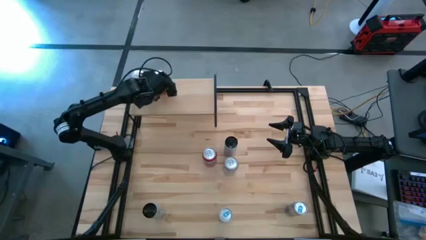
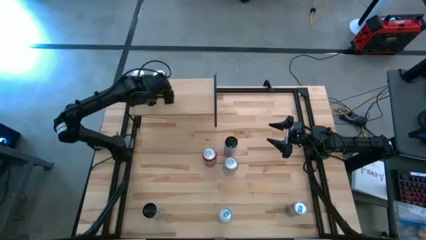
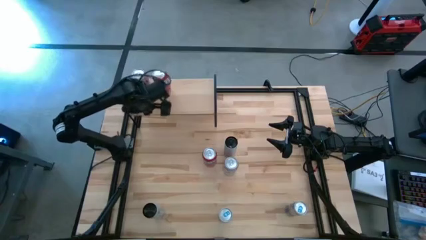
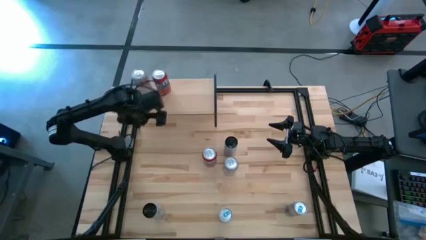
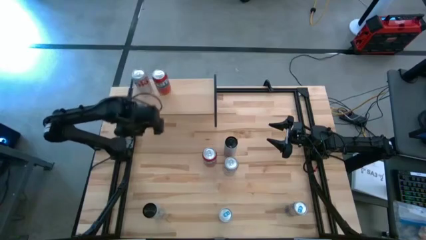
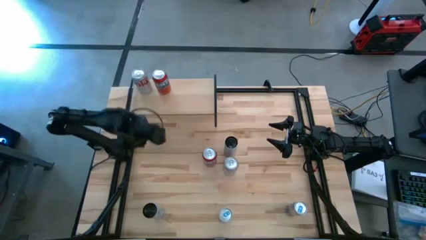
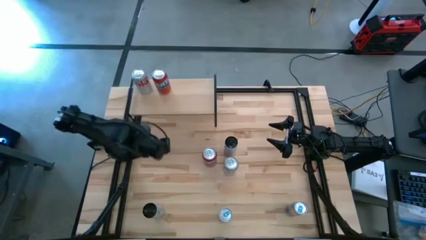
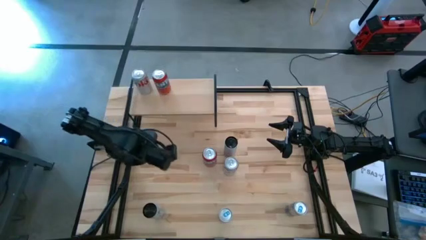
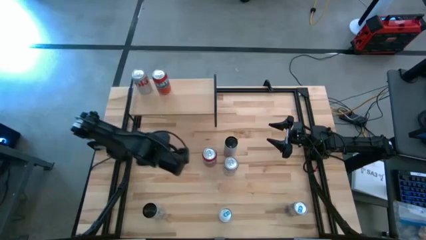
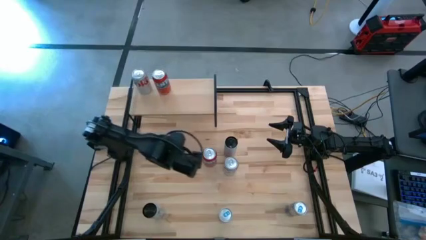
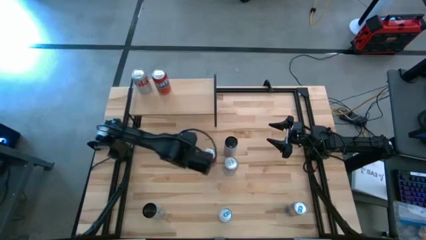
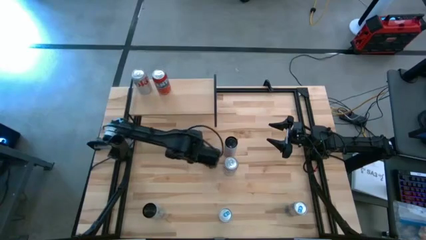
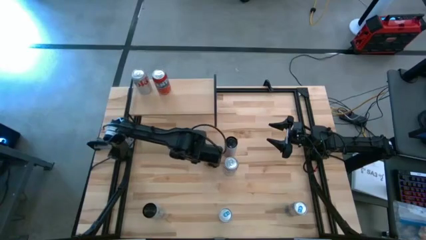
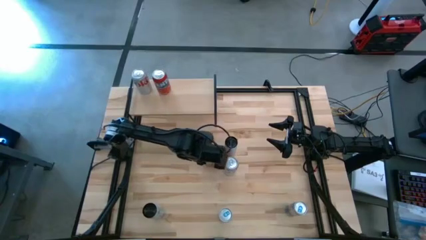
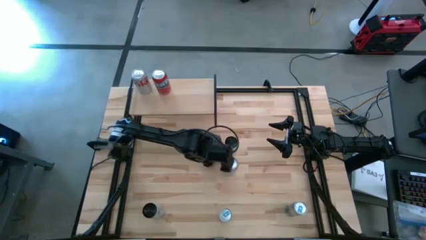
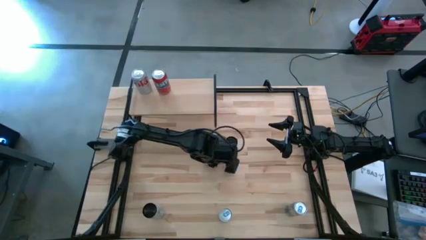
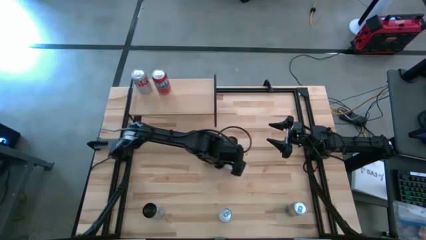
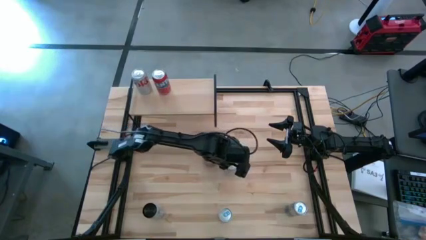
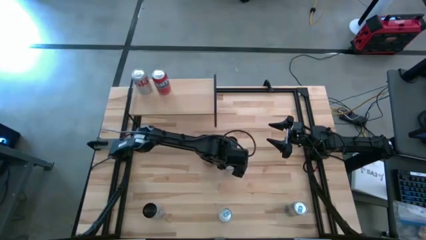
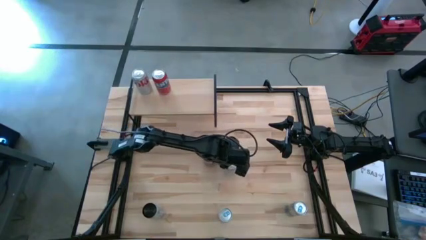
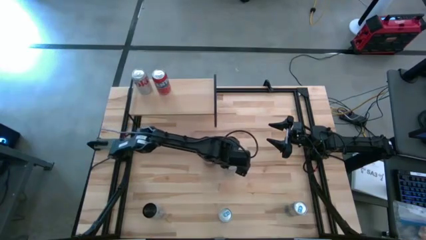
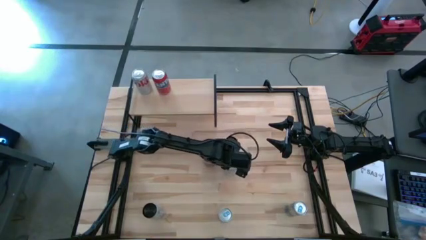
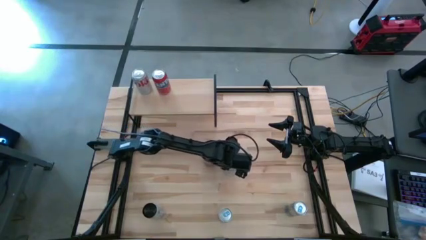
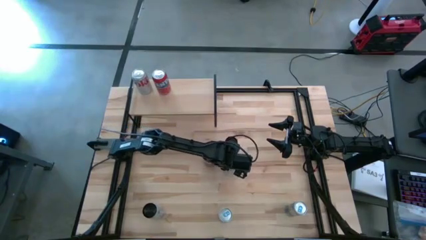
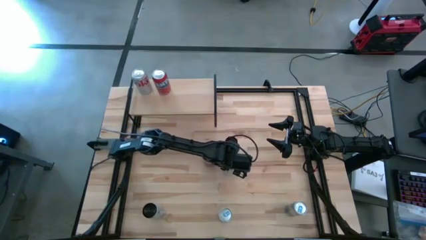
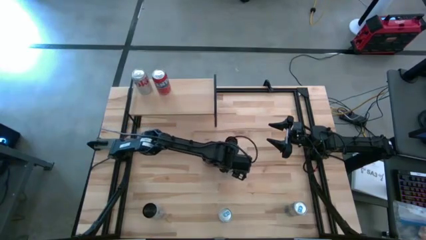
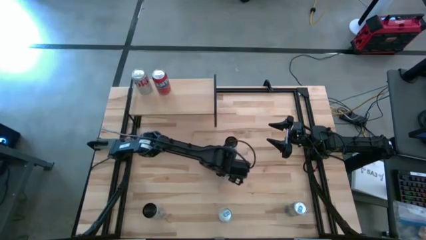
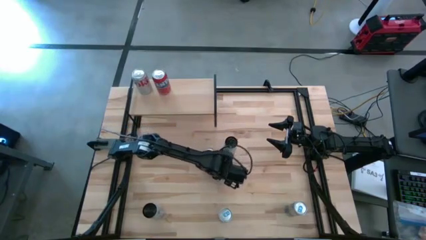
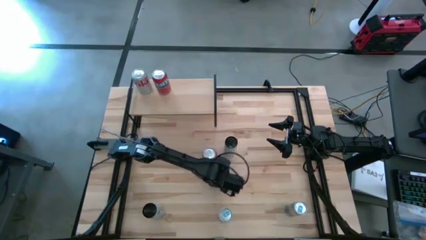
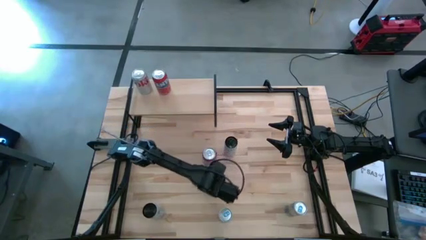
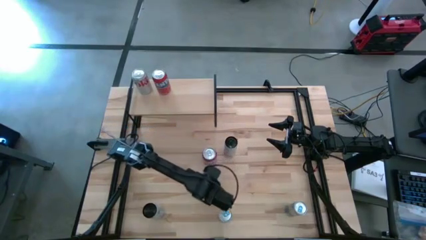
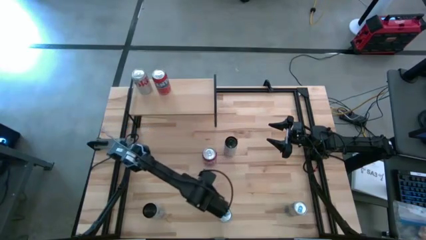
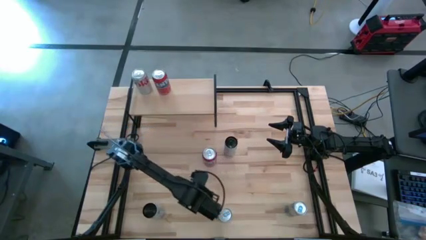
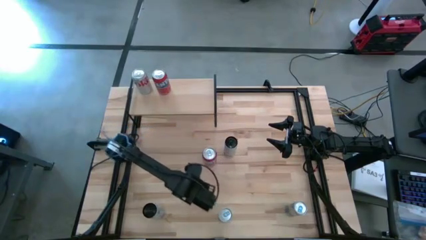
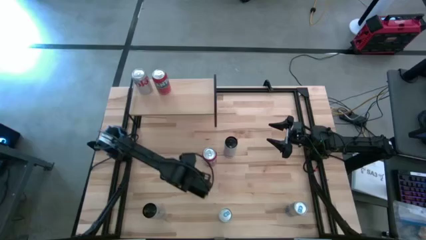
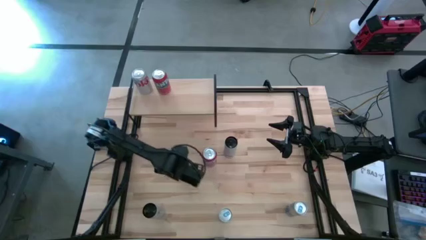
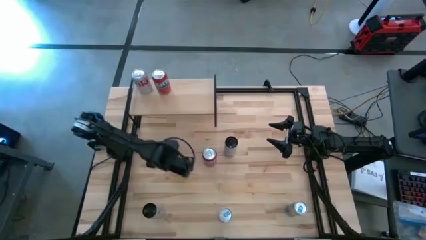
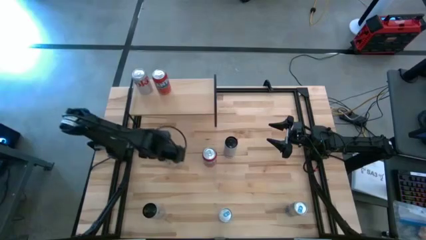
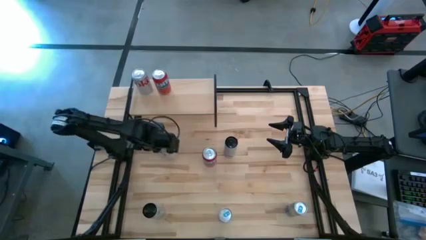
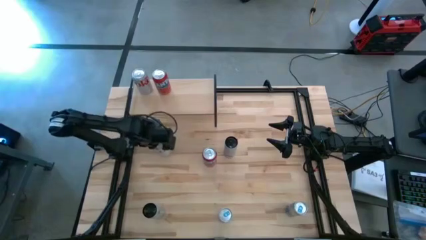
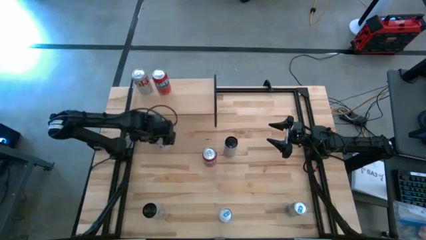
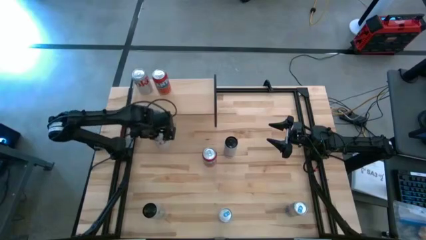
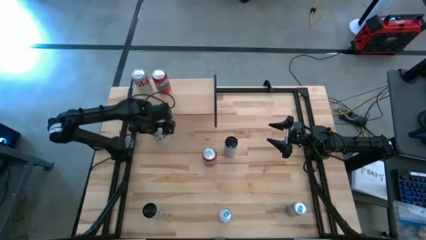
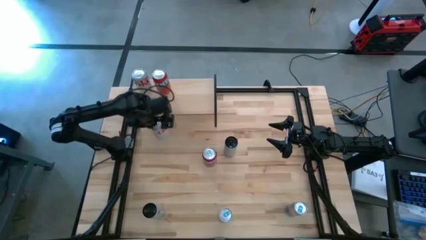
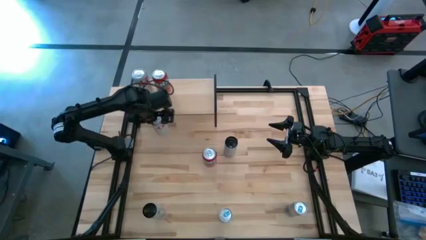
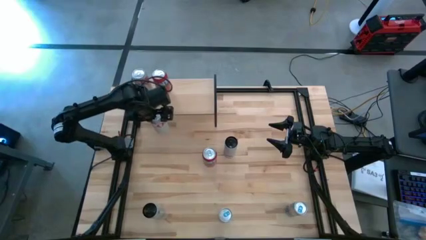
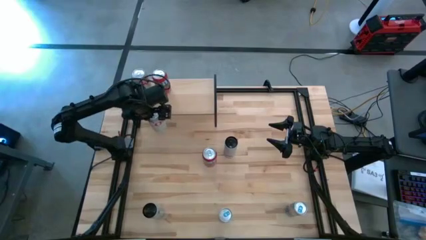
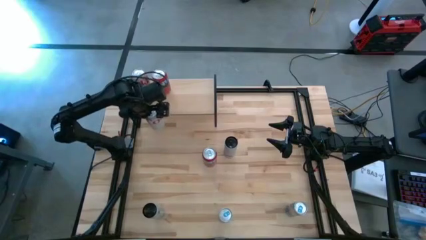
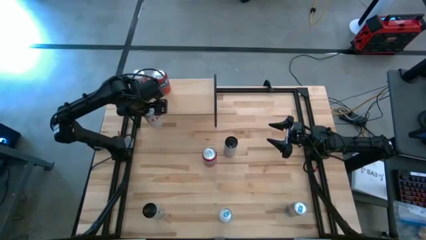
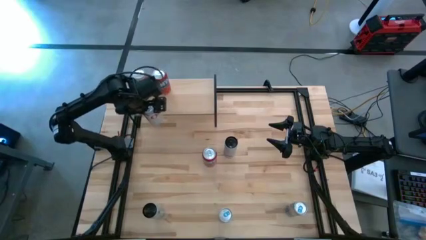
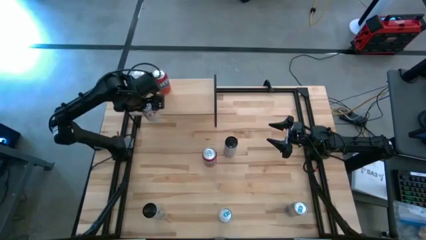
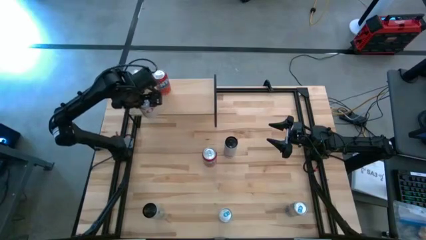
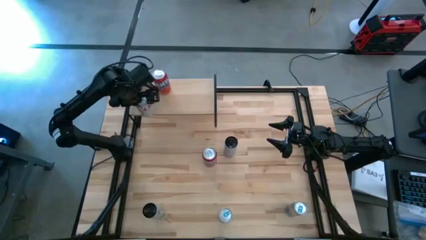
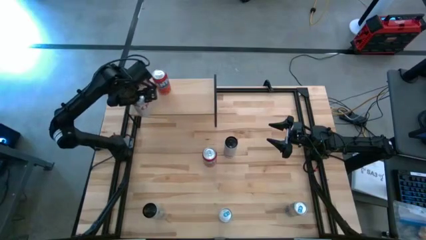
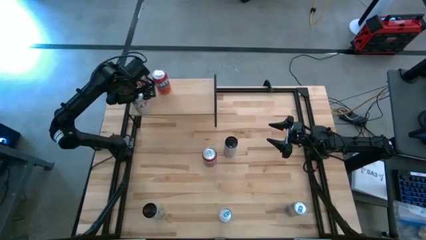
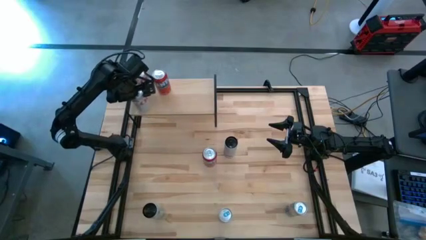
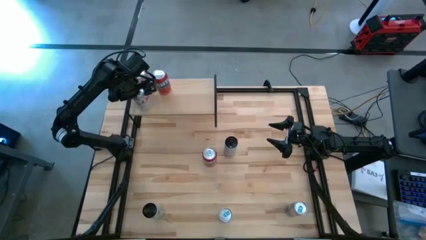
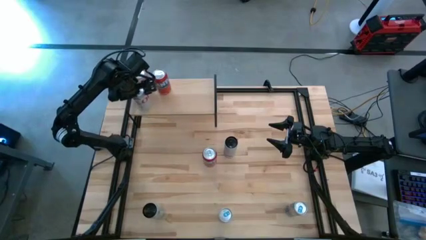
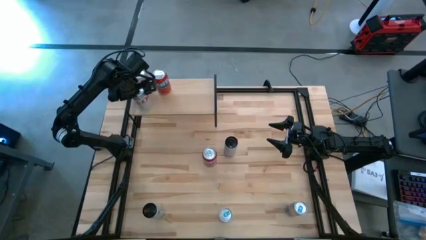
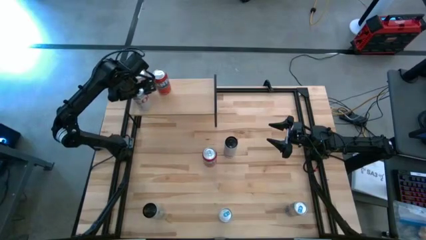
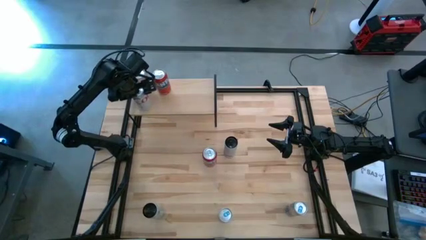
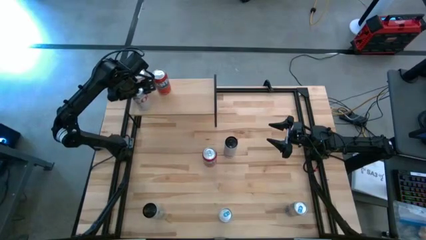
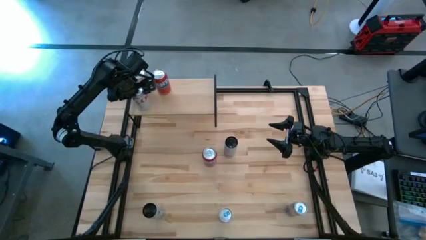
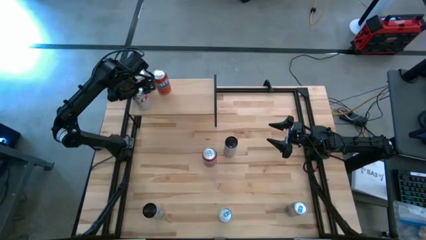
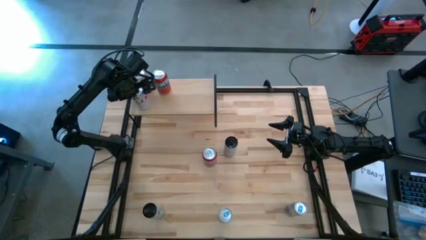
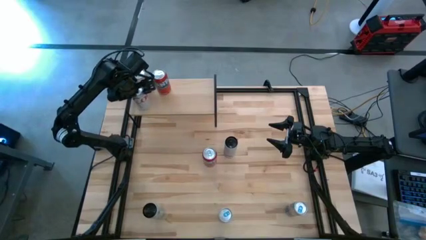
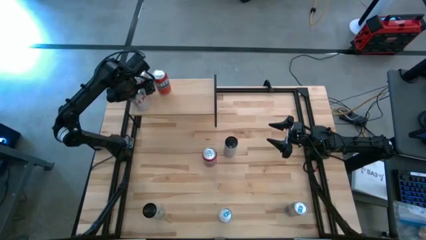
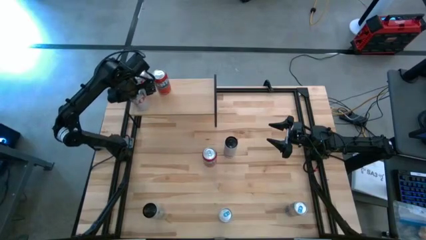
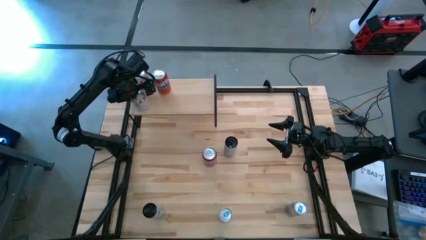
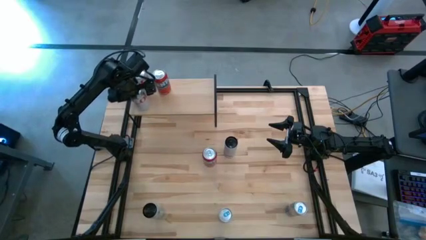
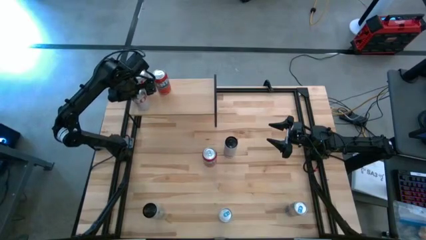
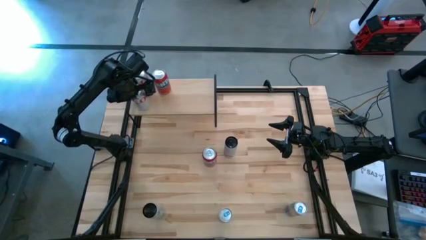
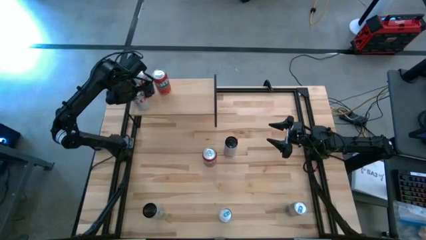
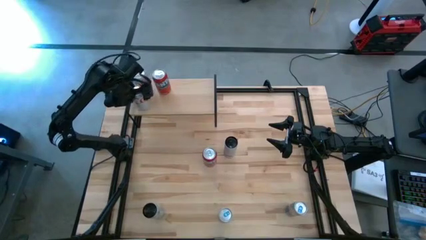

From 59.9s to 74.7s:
Task: Place canned beverage on shelf
Put the red and silver soda can and align the with the other red silver soda can on the shelf
